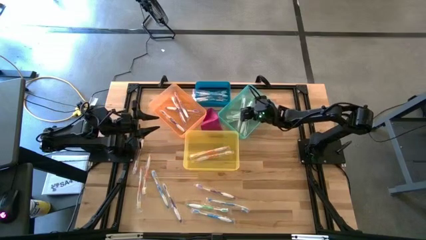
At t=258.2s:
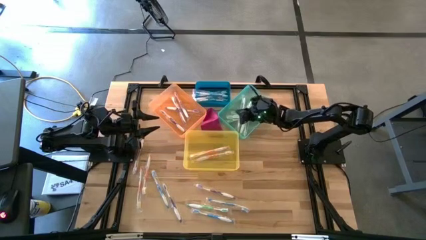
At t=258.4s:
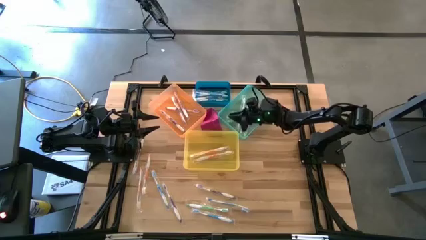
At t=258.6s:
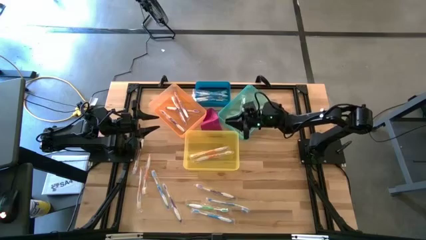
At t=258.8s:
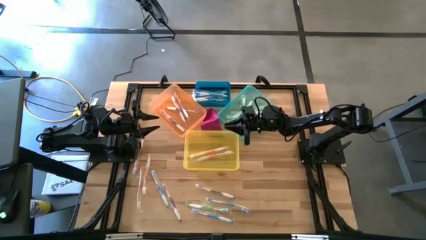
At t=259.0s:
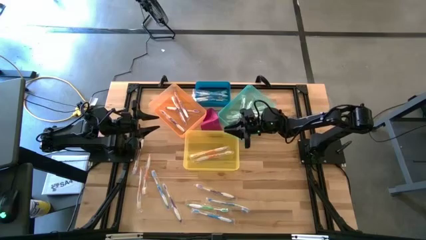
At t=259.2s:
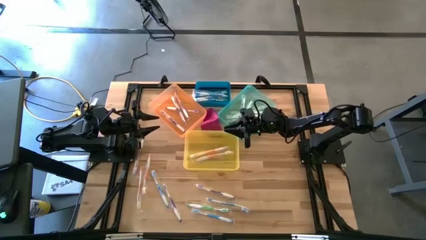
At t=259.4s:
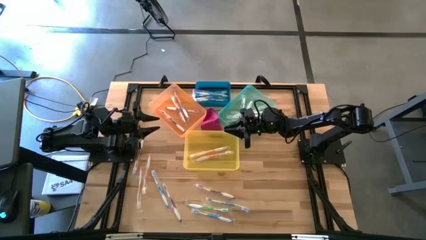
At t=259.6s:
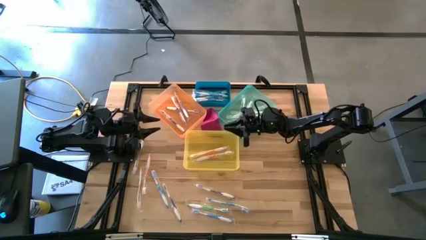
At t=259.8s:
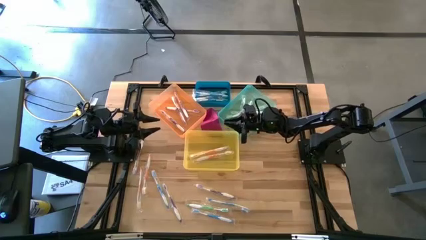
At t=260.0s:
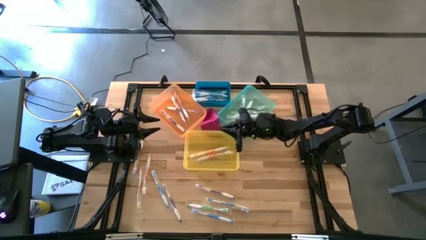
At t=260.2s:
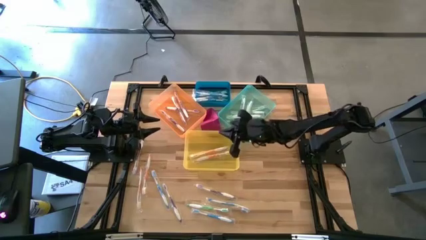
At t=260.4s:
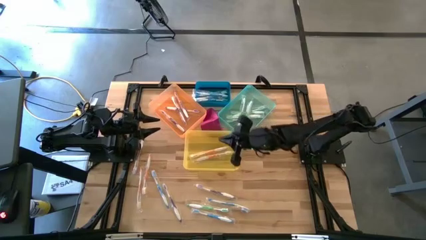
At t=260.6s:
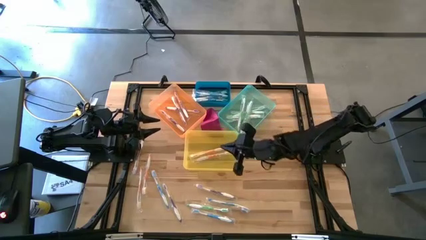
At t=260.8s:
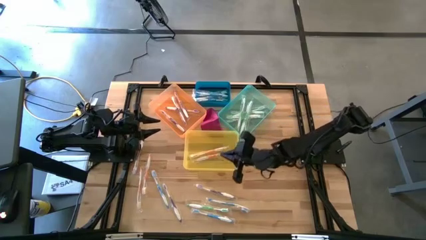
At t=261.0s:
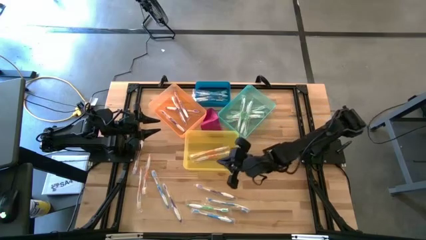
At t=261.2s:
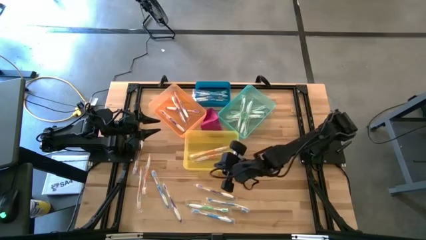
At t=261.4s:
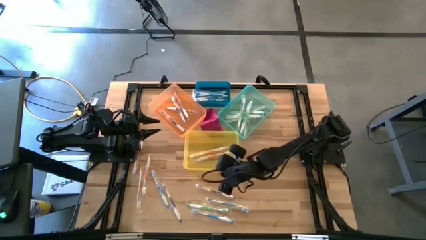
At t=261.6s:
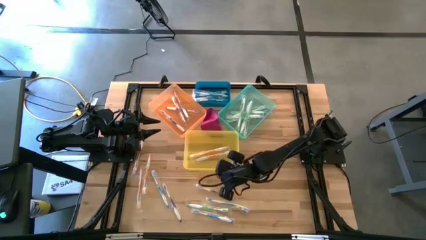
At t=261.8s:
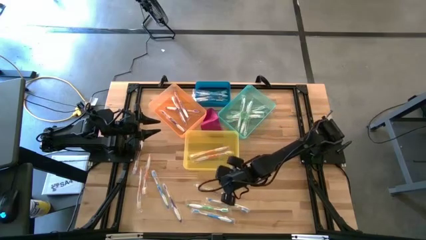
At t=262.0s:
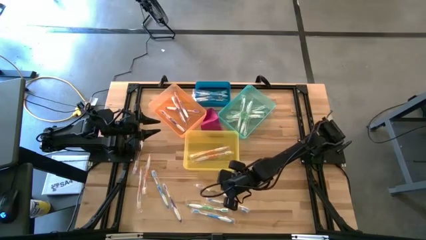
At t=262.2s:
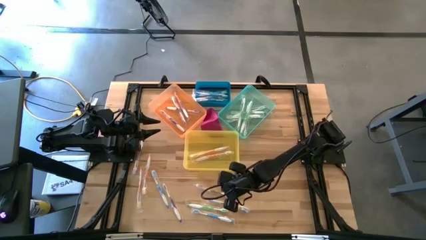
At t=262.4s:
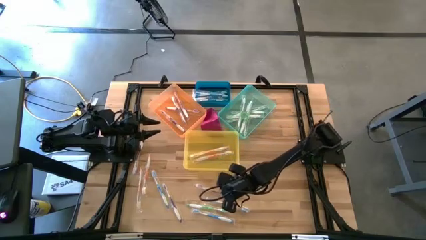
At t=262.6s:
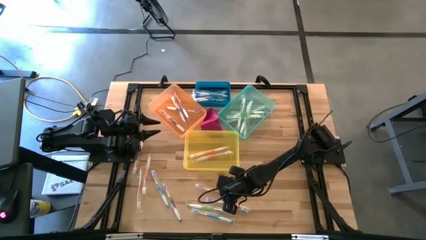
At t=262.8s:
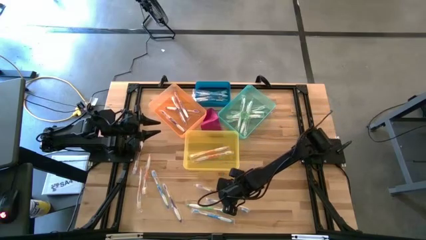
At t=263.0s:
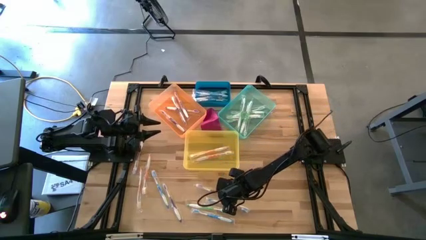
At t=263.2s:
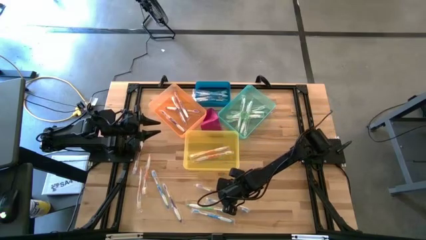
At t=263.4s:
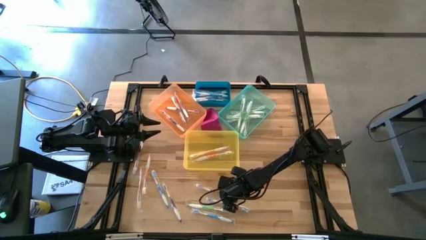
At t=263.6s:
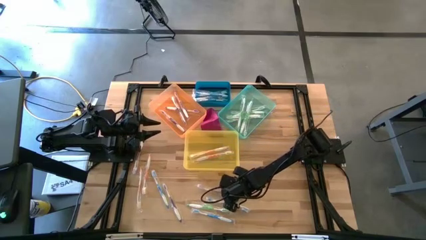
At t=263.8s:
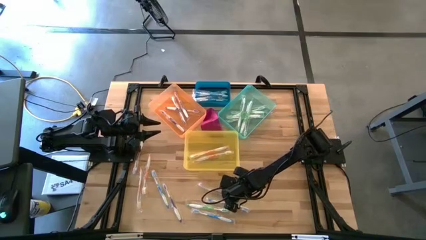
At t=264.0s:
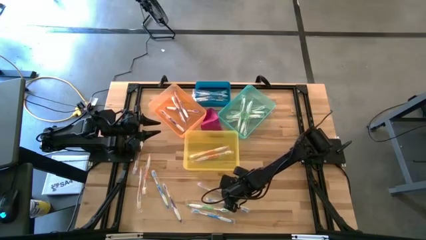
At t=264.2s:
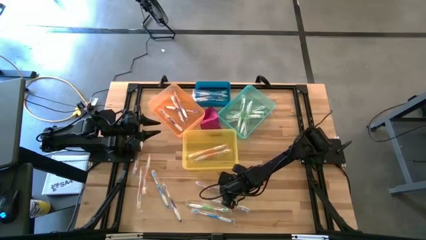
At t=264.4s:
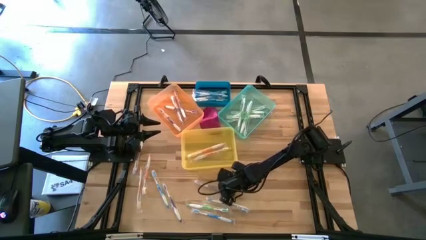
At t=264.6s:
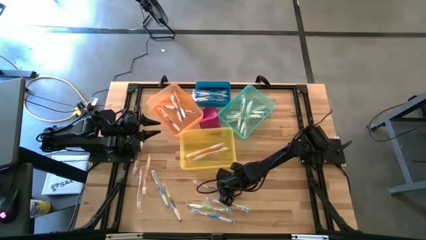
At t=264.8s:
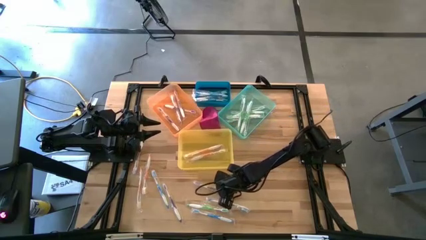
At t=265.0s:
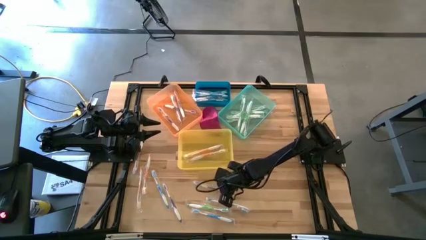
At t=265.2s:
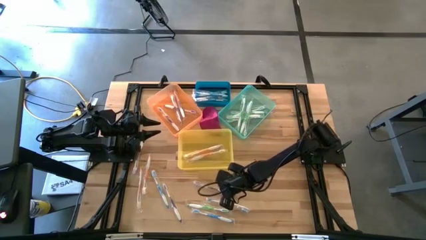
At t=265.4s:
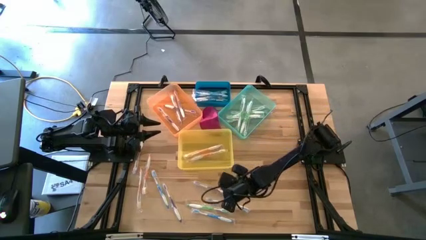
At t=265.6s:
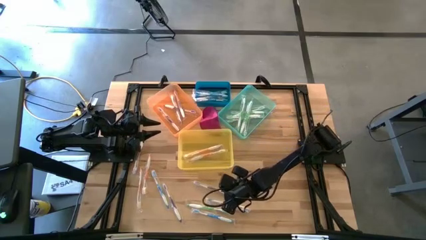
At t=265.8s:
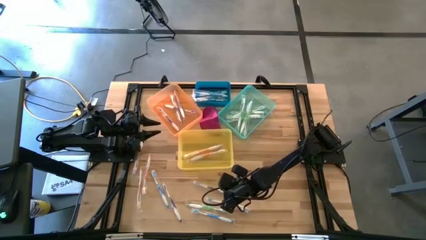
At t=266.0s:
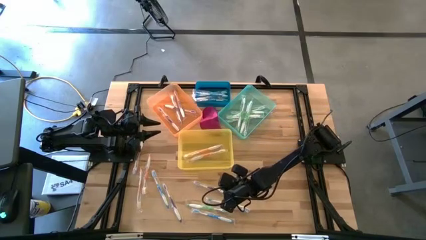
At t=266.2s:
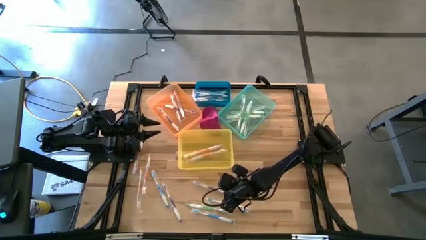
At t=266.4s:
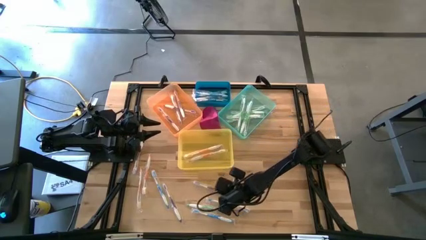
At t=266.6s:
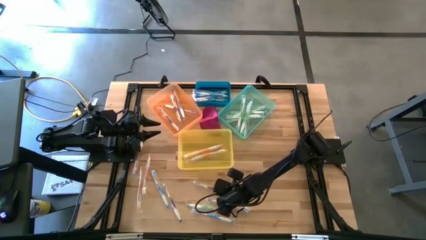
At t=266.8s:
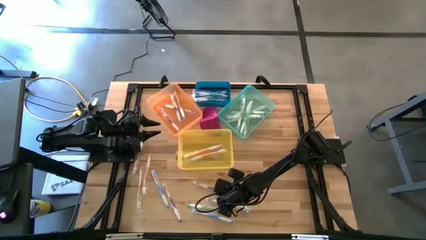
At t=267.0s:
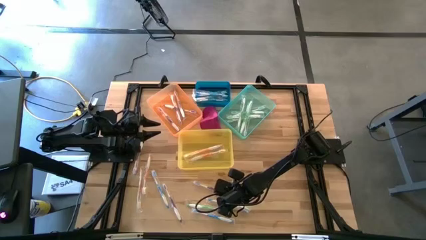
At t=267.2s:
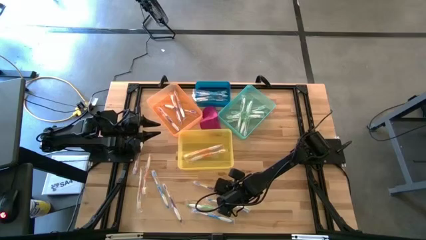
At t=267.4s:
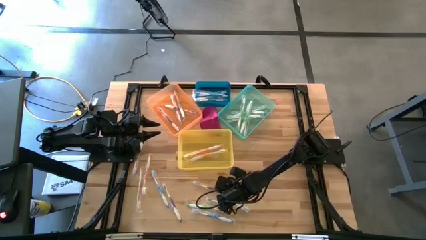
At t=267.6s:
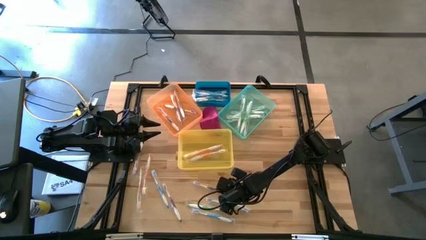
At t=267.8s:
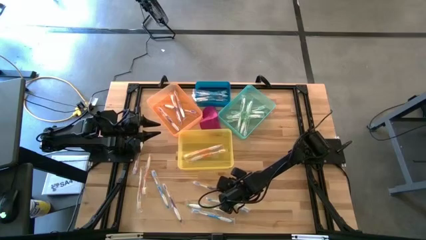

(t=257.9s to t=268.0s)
Task: Pick & Place Toothbrushes
Put the purple toothbrush into the orange bin
